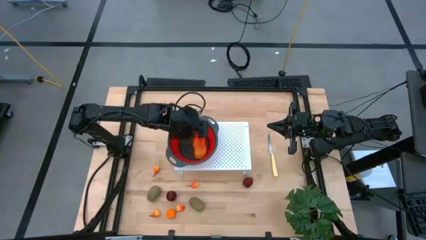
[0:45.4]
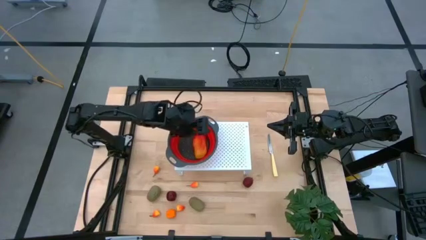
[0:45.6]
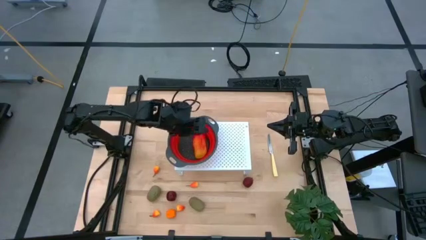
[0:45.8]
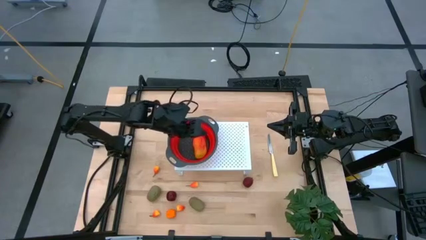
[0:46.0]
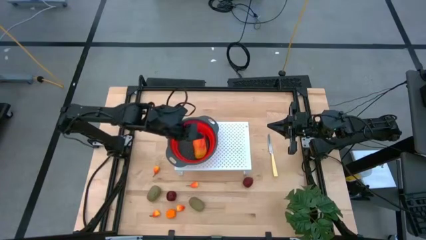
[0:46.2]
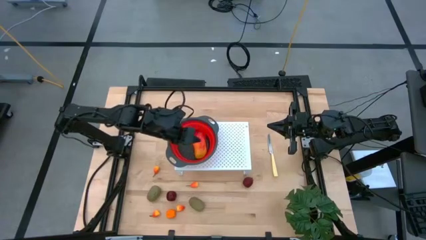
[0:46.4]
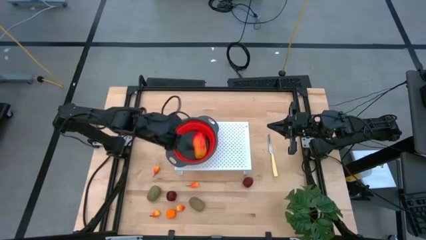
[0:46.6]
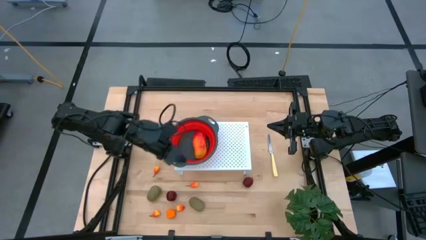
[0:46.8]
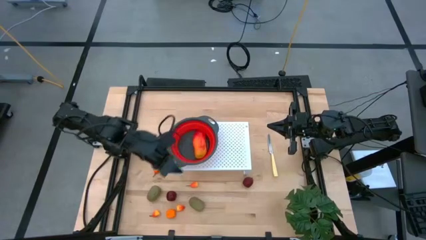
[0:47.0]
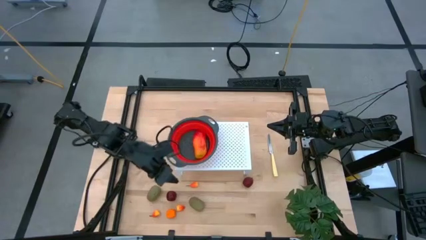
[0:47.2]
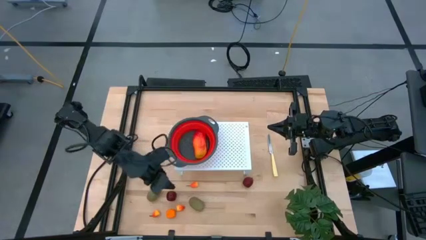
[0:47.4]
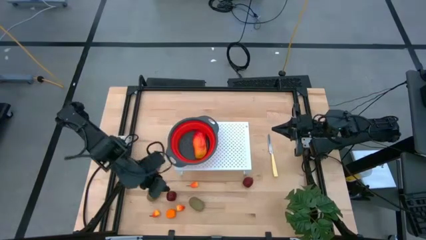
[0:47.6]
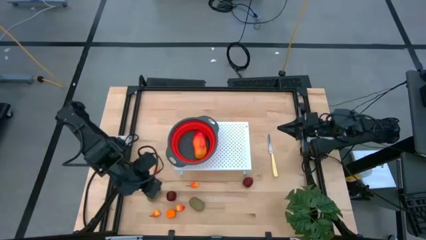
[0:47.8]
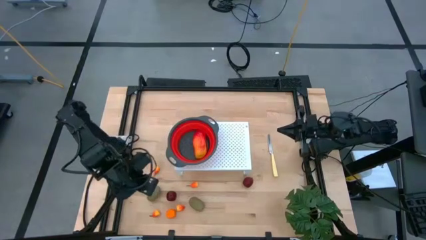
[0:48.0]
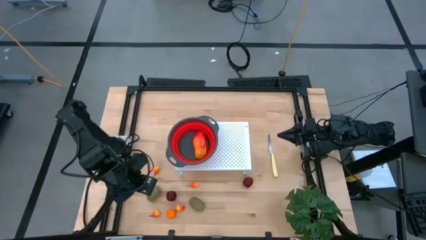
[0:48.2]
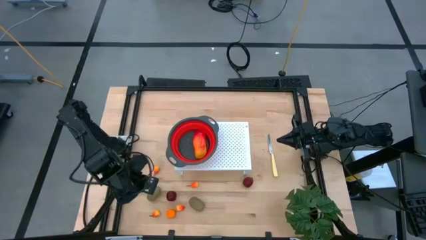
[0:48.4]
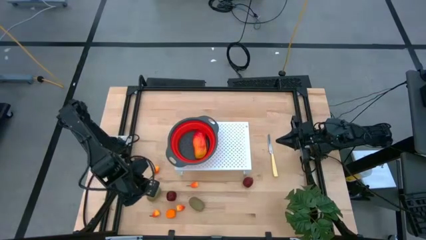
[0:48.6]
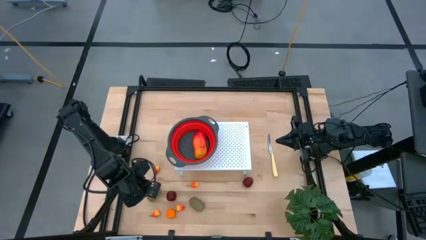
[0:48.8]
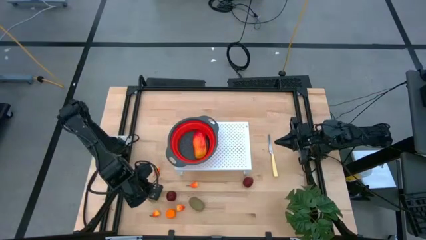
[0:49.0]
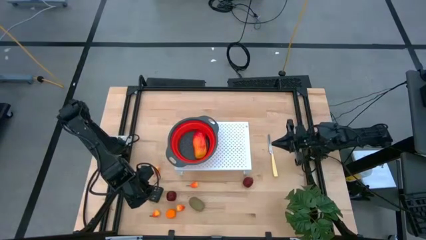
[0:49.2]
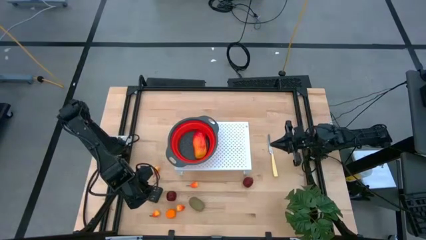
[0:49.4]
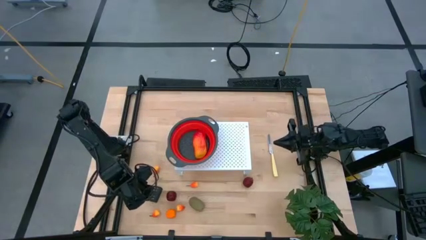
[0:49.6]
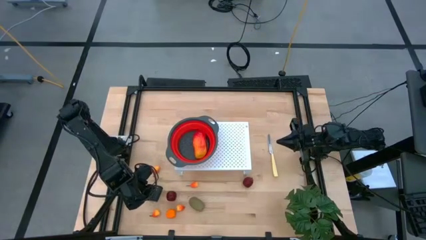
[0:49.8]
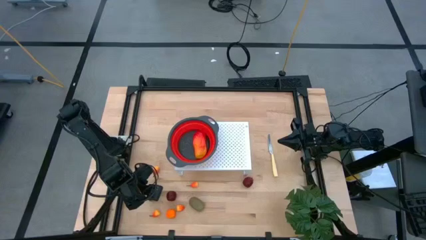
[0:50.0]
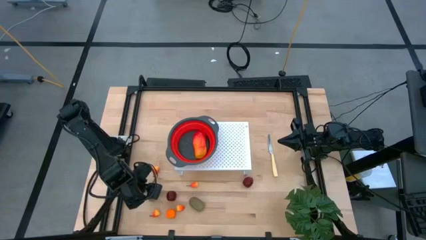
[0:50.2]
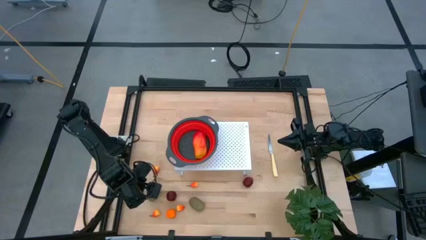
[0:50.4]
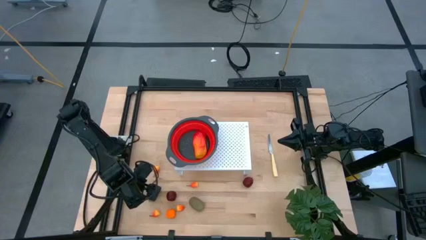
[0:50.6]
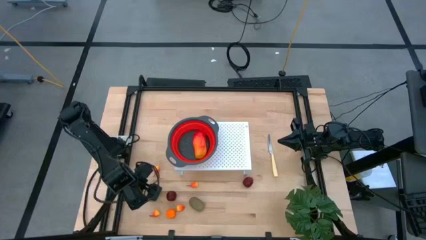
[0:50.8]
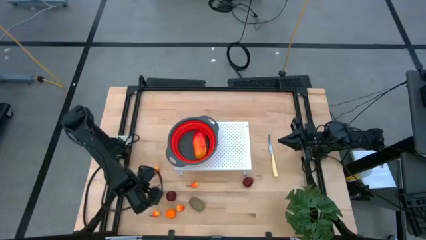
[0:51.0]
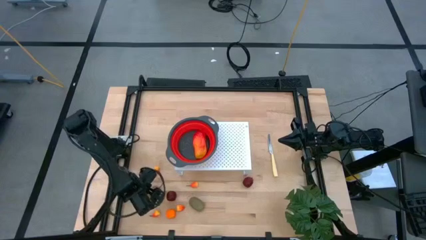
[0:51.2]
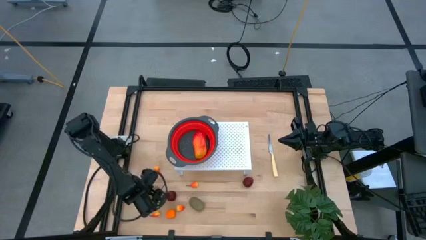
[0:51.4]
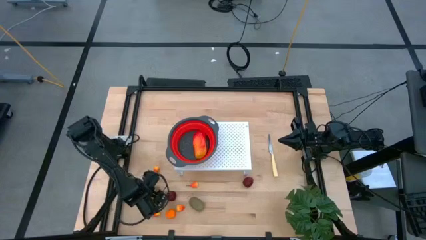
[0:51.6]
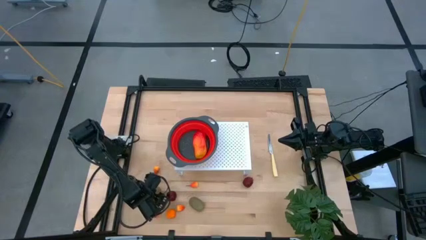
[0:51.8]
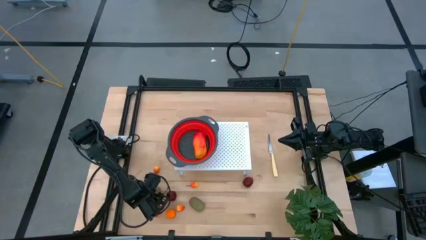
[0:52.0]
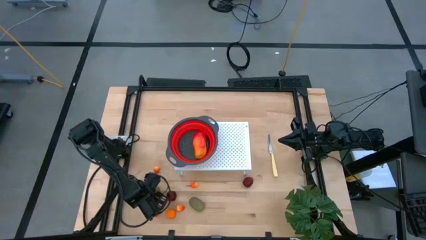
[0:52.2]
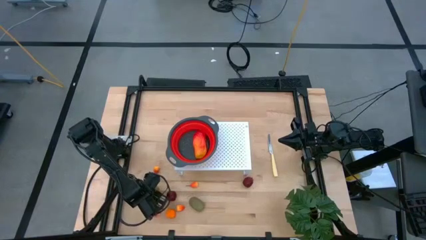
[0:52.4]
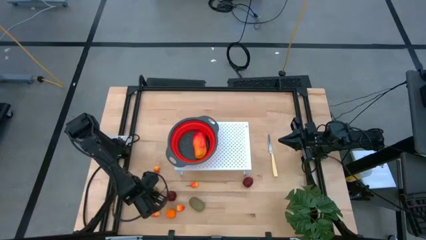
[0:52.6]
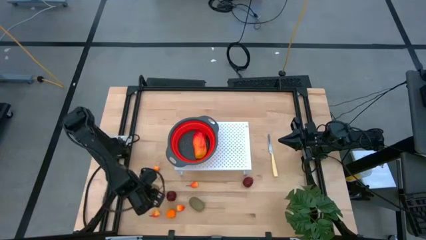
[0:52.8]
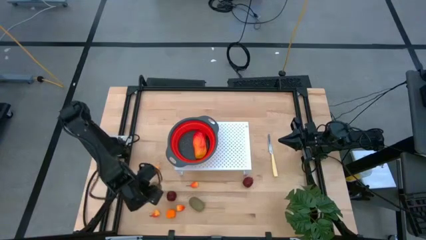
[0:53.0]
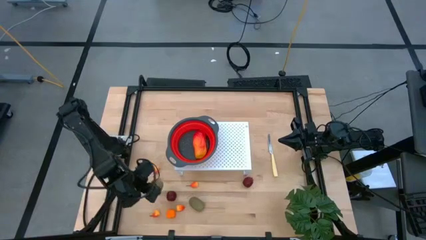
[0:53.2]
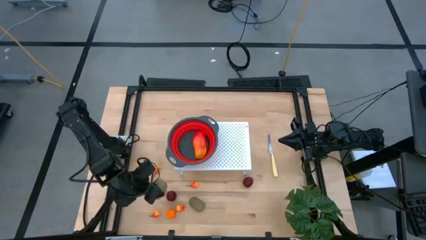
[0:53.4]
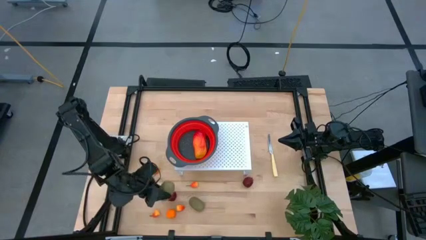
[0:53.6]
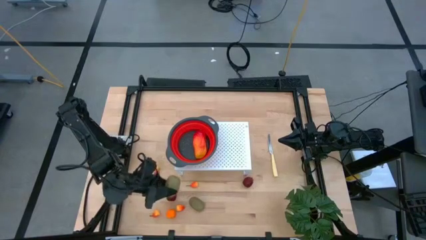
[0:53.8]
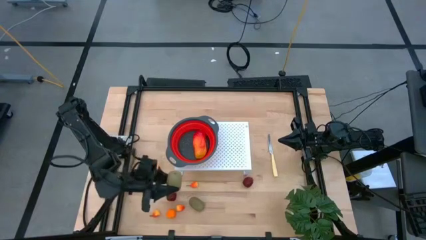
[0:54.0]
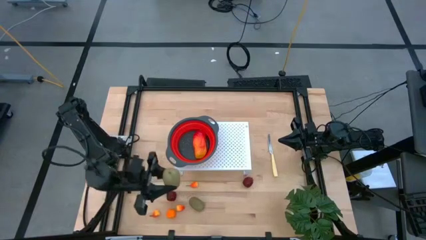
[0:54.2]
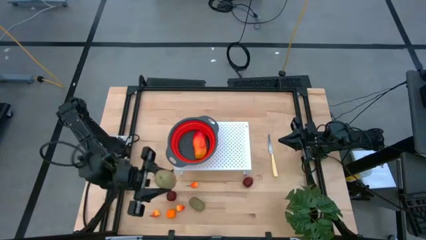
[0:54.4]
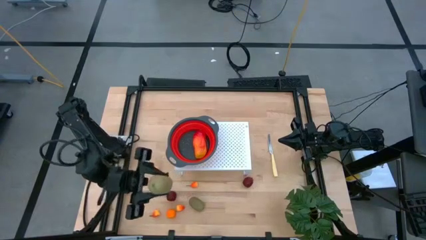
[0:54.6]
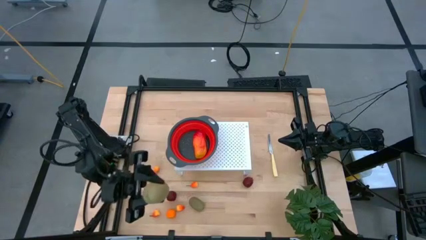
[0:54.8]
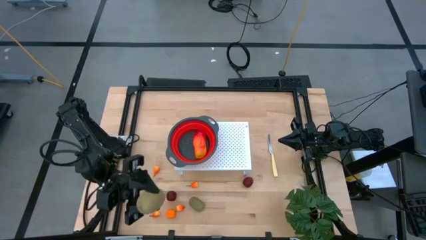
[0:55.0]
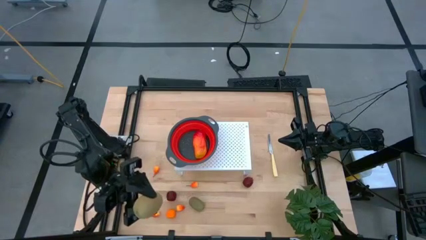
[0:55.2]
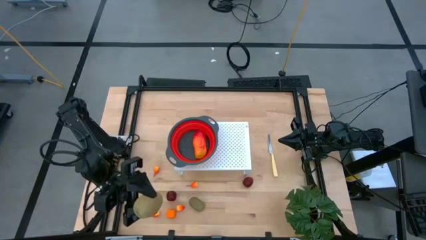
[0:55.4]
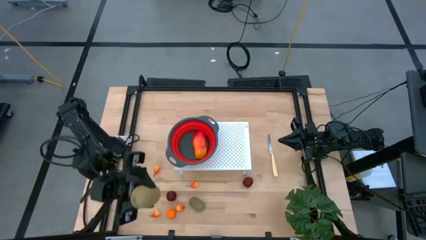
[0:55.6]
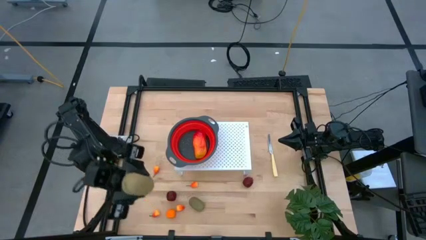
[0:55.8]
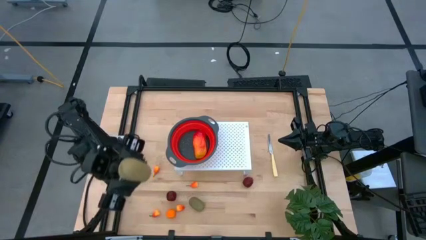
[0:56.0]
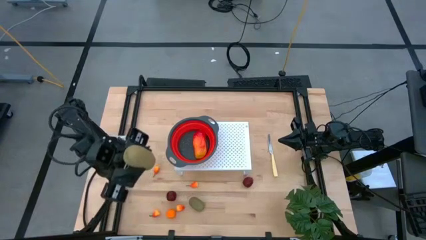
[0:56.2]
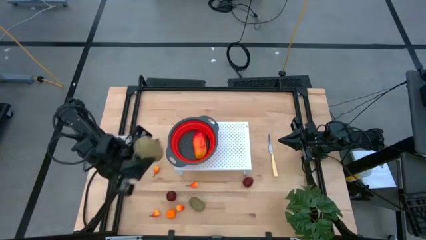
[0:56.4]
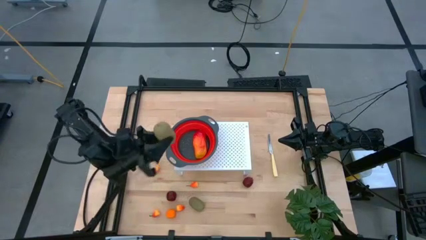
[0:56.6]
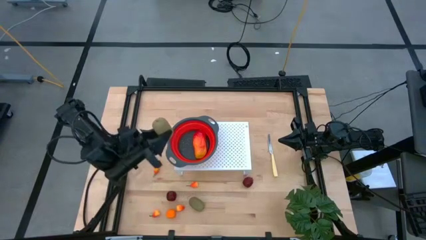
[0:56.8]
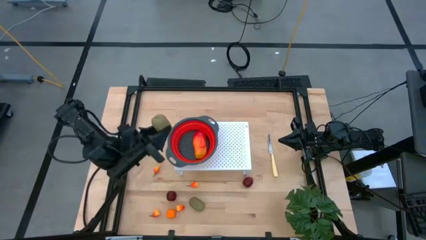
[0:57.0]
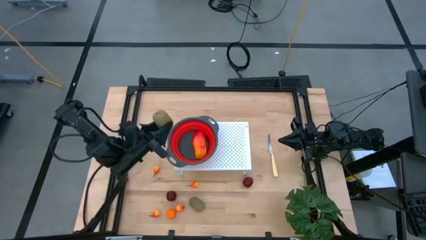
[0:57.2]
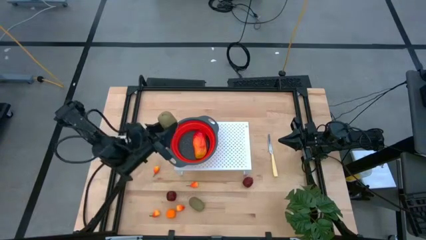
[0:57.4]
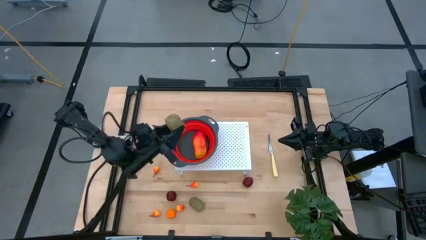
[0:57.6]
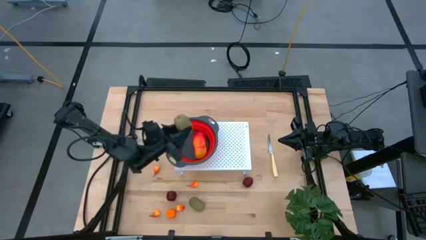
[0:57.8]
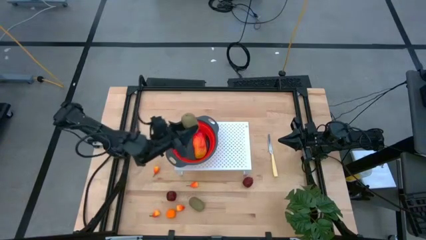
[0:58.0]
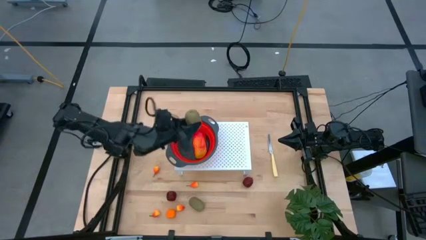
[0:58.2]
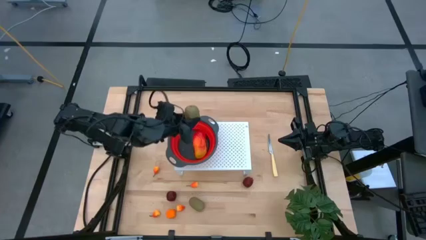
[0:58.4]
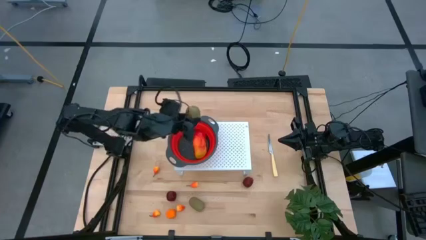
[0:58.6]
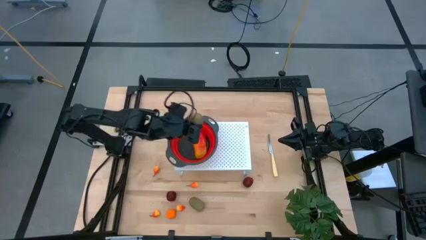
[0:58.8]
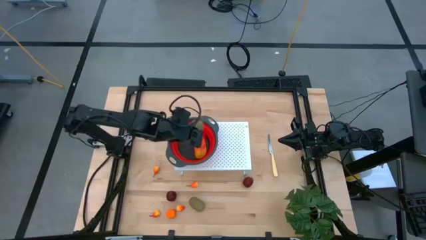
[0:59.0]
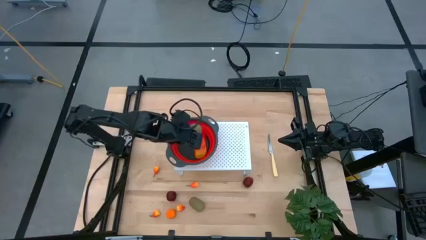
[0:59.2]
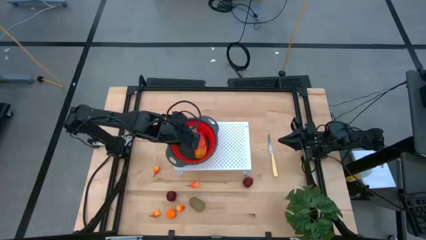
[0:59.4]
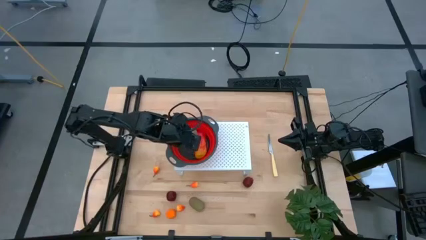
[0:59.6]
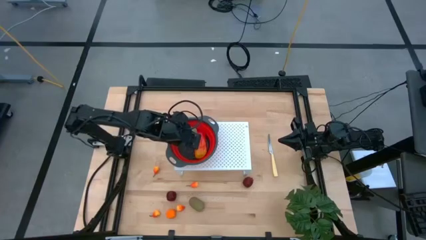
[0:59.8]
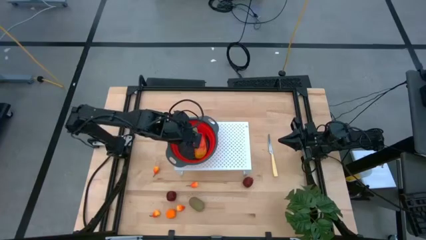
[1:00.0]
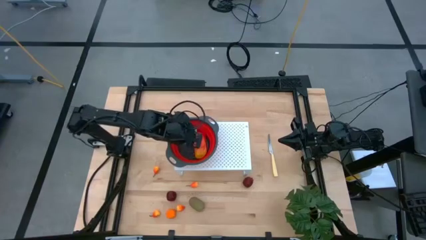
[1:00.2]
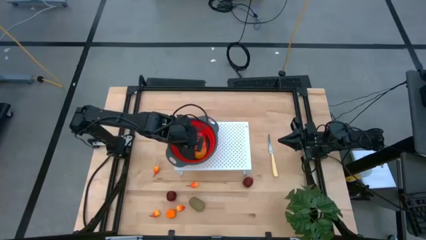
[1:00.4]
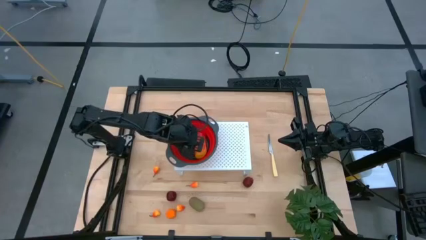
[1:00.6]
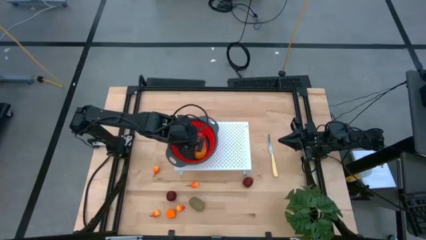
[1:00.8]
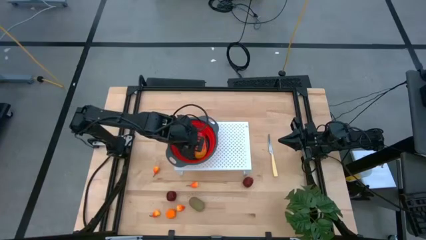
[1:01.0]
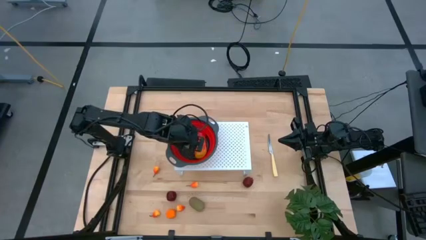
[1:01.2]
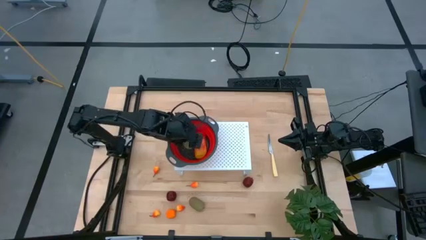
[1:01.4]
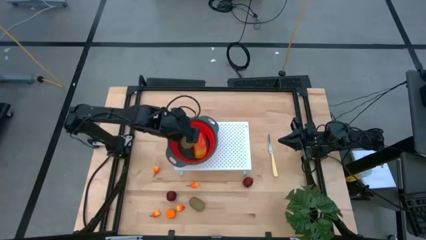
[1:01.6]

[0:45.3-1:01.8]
Task: Pick & Place Fruit
Put the brown kiwi into the red strainer bowl on the shelf
